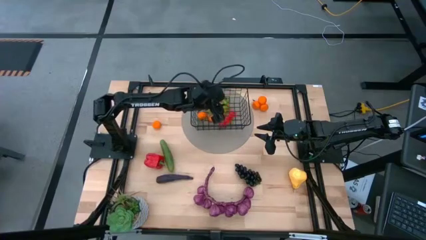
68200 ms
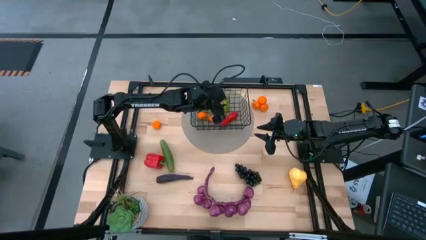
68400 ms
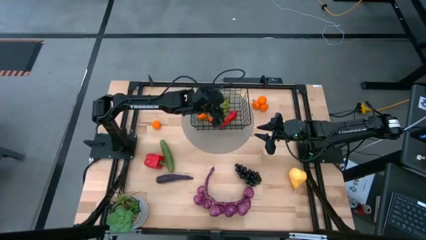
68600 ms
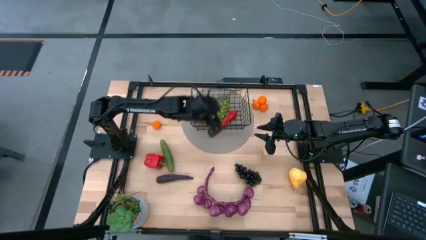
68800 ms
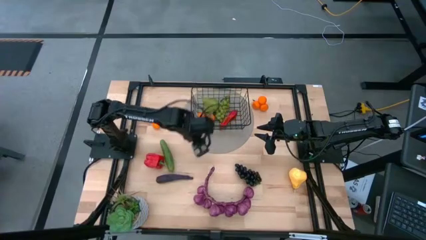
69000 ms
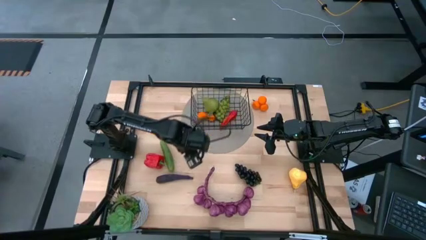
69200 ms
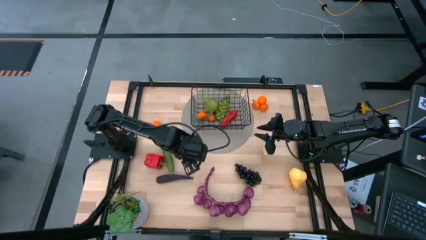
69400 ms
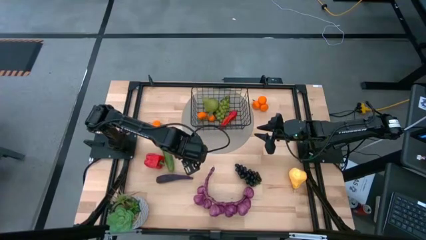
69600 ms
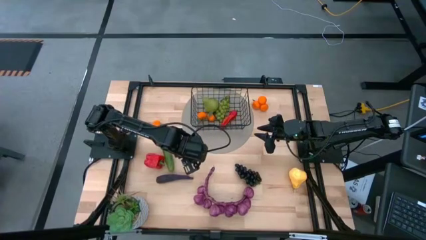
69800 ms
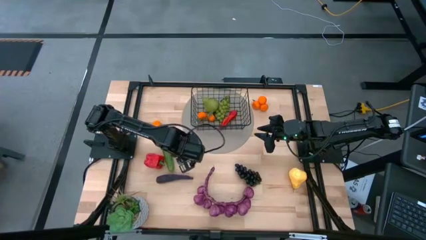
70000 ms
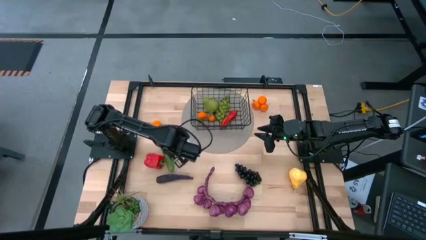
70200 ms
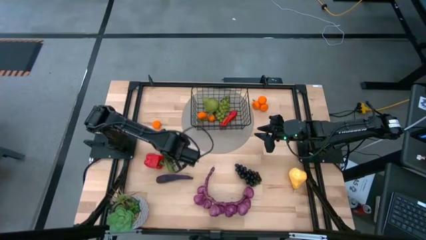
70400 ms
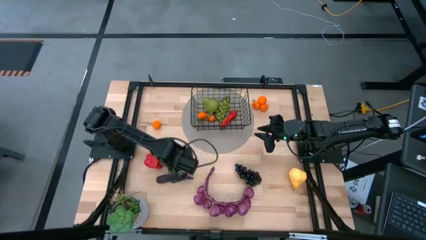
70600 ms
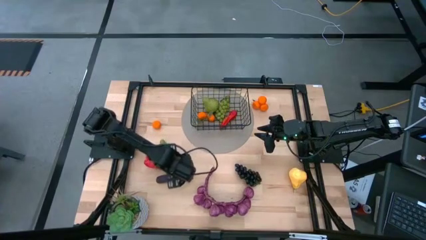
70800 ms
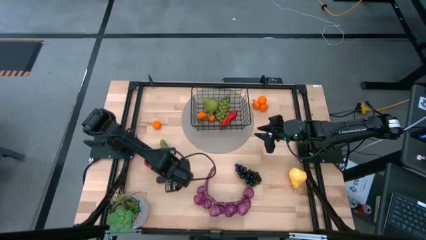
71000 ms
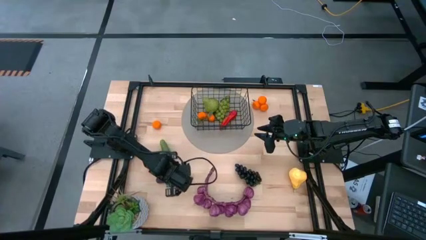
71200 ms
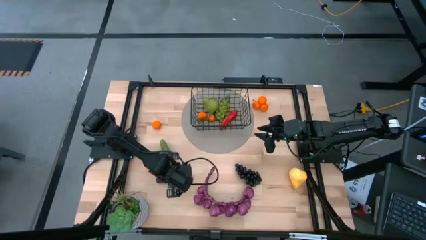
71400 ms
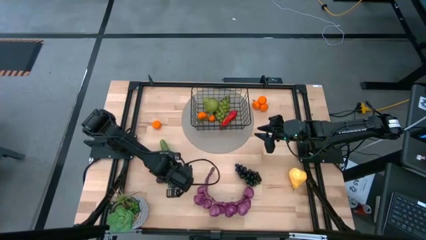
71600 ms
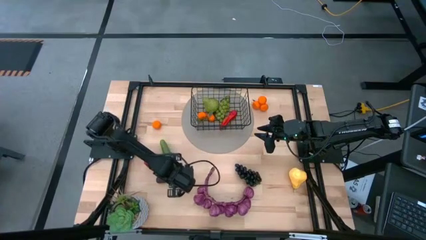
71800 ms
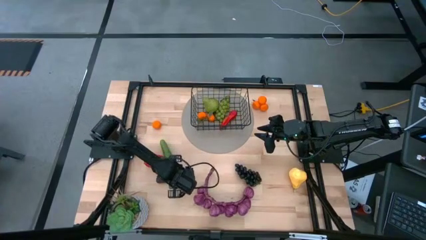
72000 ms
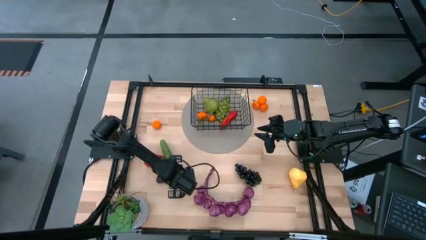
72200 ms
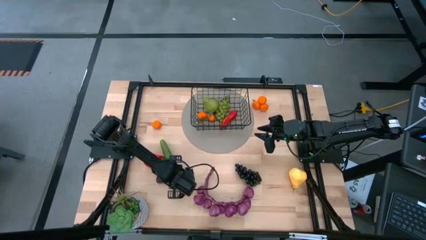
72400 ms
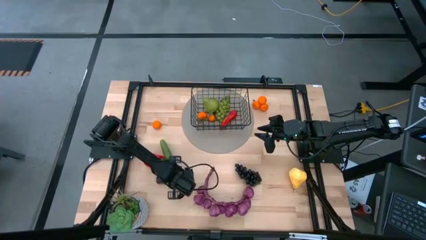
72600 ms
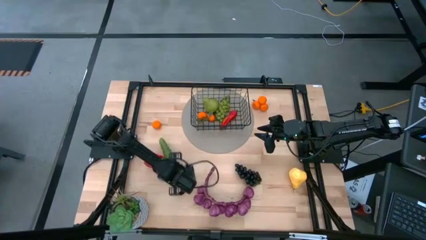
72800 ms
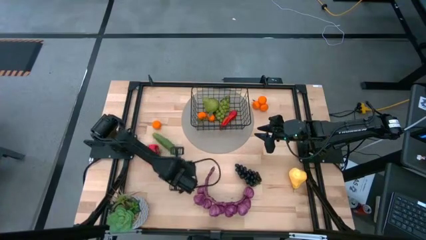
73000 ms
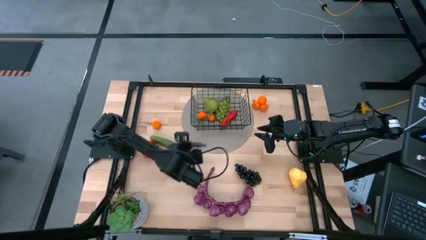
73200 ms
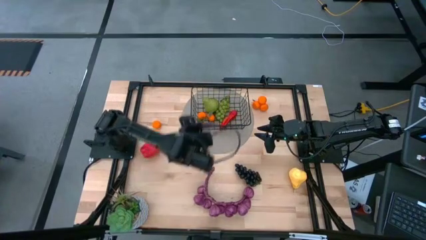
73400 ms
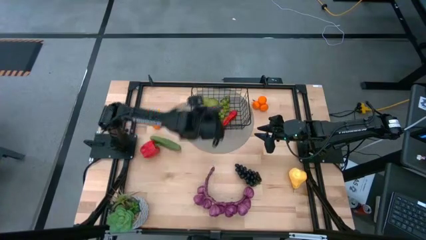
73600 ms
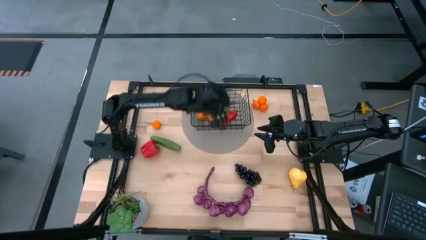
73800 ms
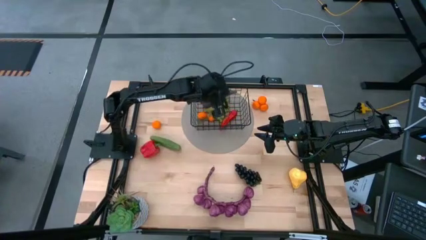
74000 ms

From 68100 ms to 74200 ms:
Task: Build produce basket
Put the violet eggplant into the black wire basket

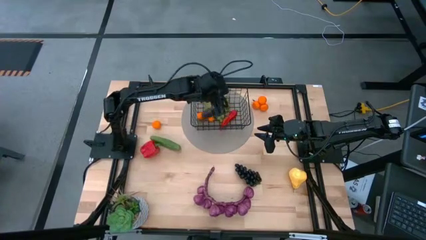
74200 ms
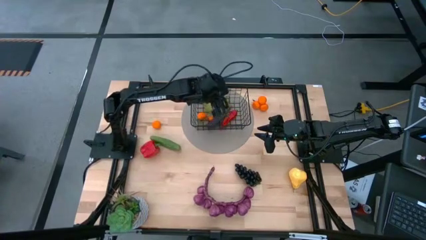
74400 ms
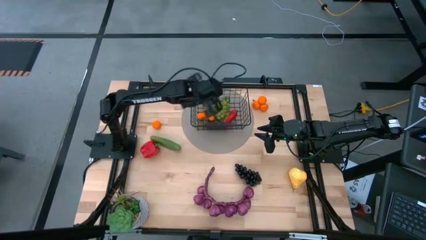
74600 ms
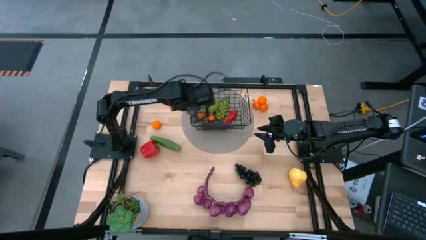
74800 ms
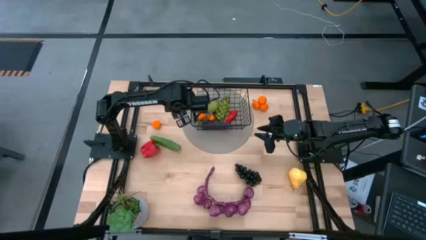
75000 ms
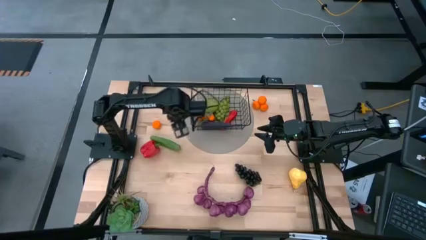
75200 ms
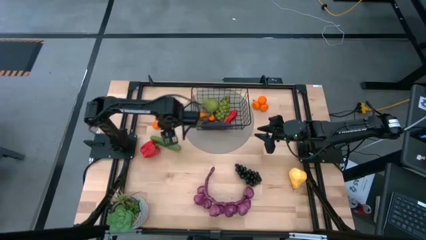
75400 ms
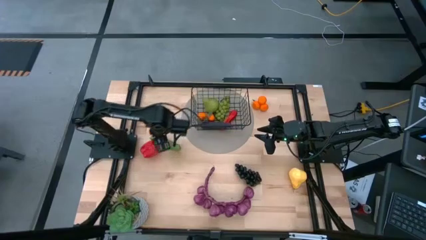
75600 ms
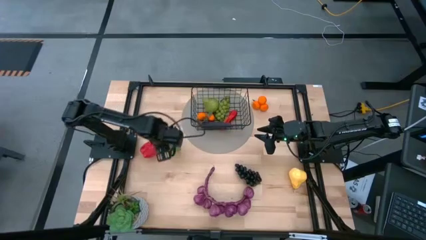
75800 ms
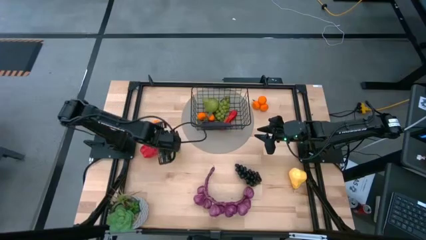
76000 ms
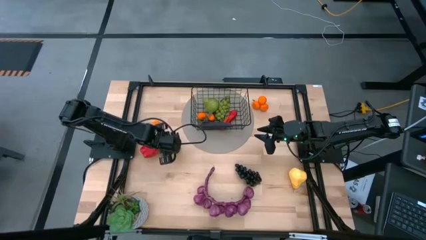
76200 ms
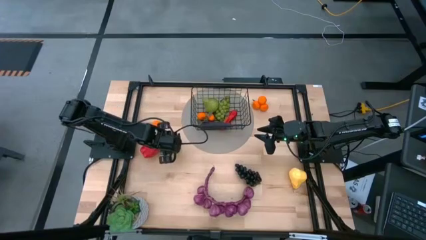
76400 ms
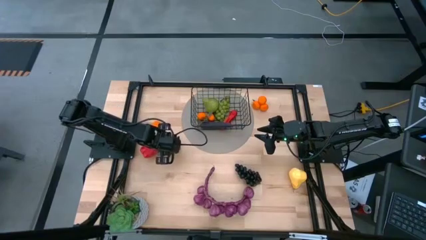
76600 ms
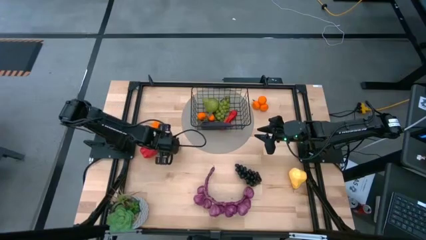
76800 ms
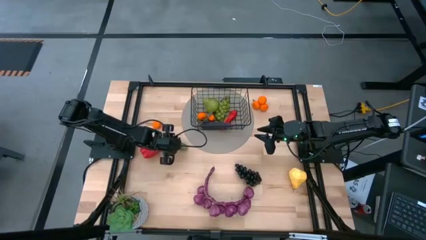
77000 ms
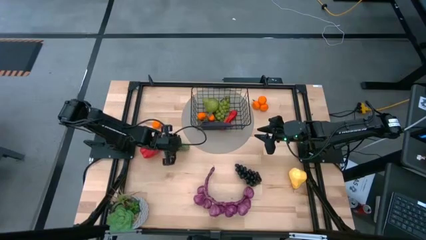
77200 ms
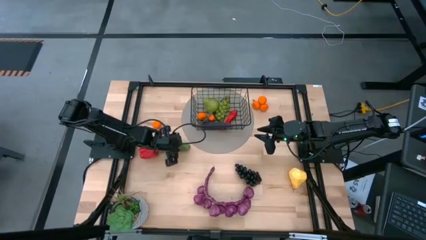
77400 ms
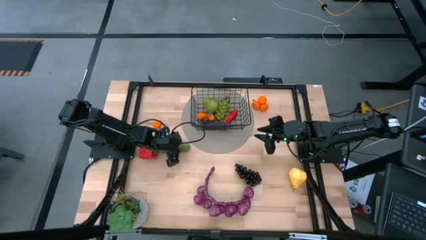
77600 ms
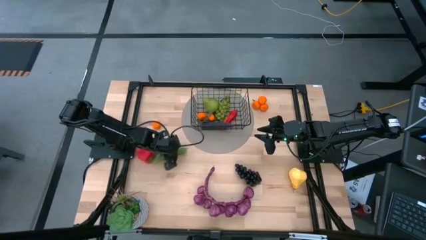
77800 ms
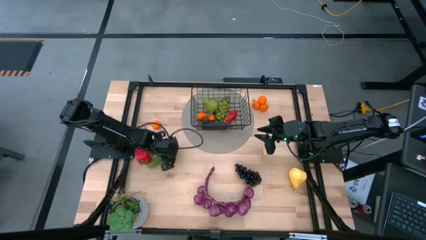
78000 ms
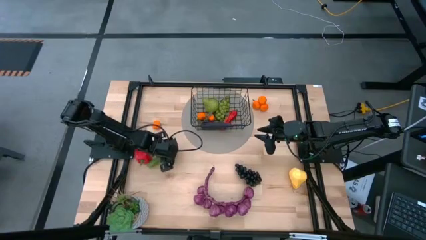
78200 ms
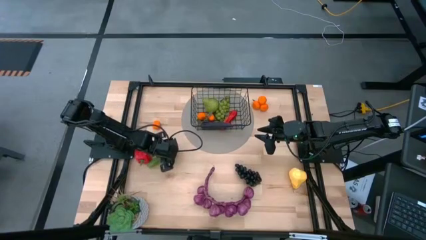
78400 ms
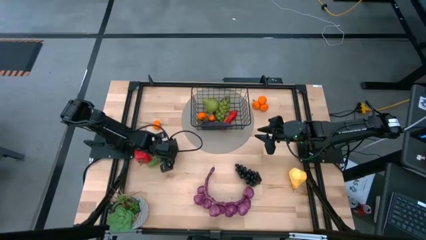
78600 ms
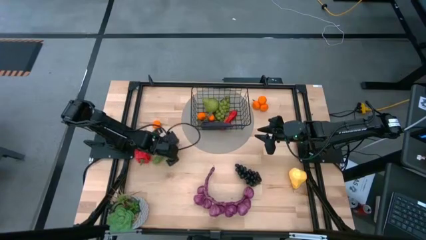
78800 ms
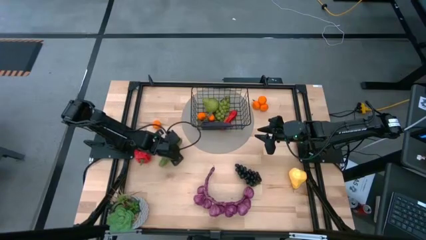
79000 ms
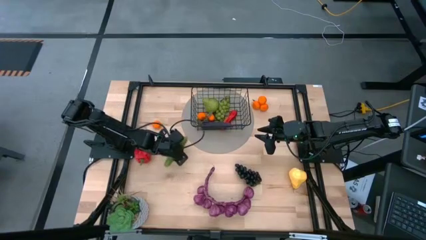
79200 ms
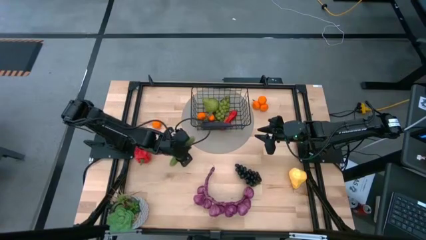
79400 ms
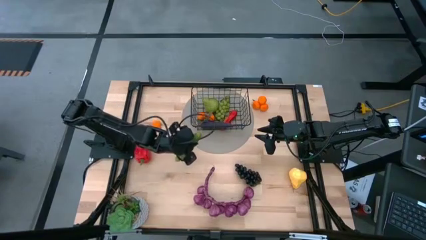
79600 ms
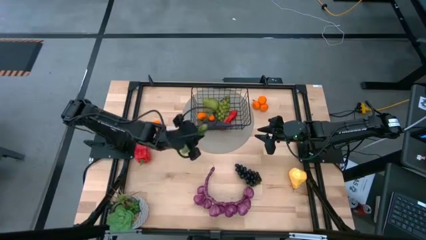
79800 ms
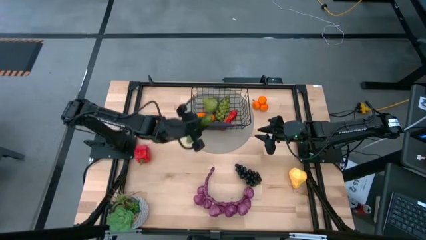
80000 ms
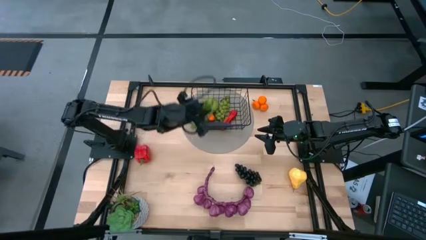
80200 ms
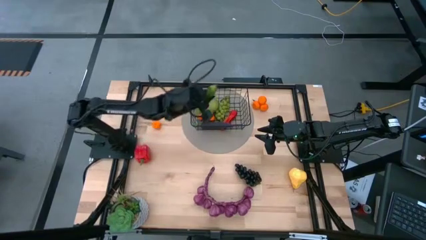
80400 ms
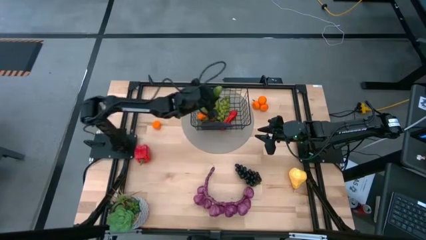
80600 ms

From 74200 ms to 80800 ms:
Put the green cucumber into the black wire basket

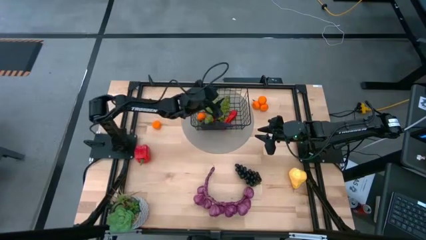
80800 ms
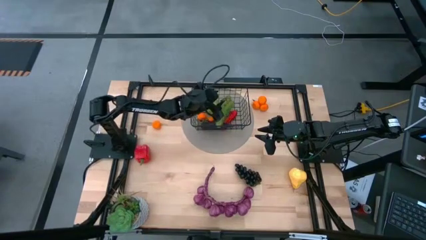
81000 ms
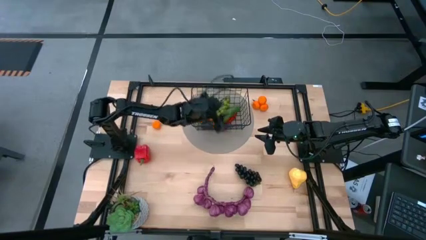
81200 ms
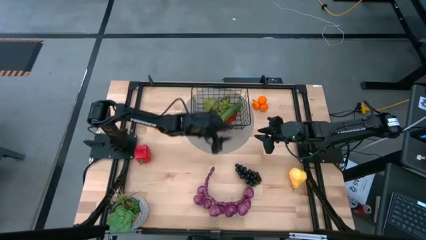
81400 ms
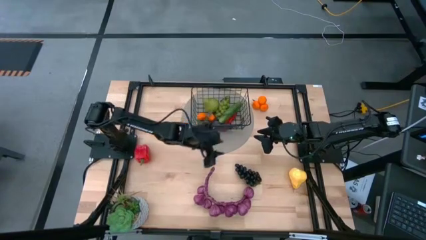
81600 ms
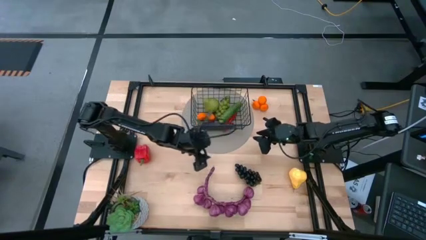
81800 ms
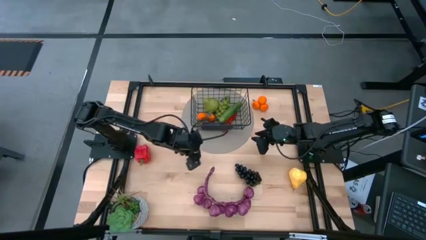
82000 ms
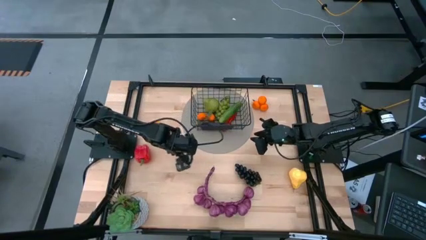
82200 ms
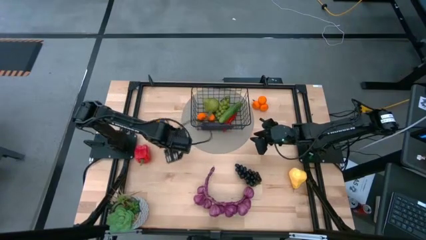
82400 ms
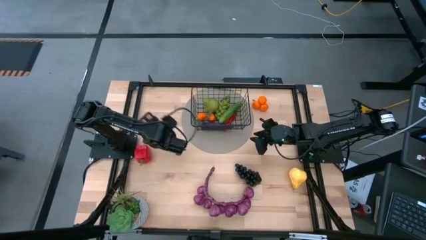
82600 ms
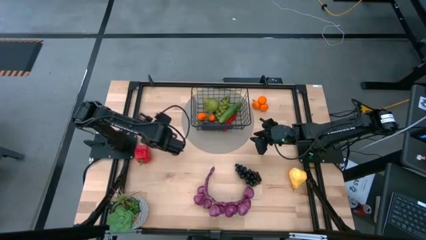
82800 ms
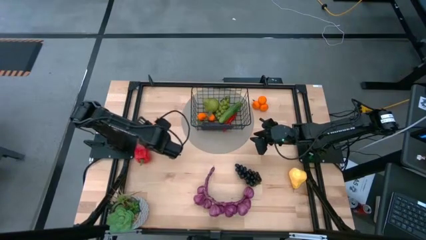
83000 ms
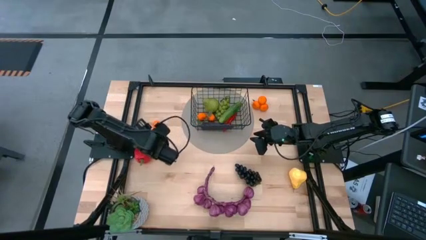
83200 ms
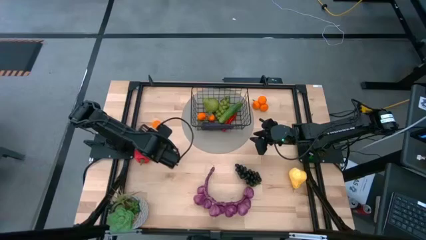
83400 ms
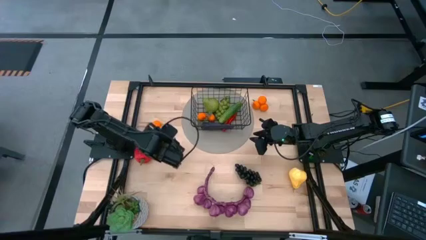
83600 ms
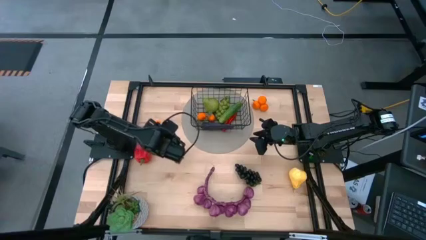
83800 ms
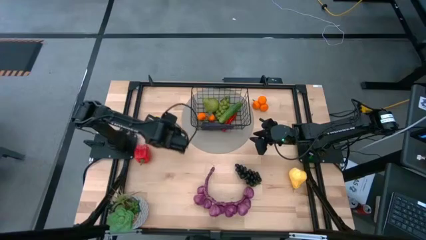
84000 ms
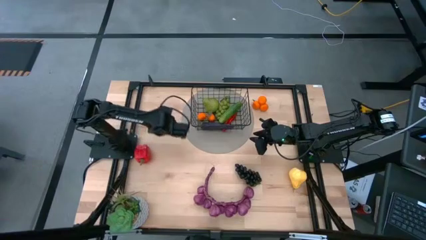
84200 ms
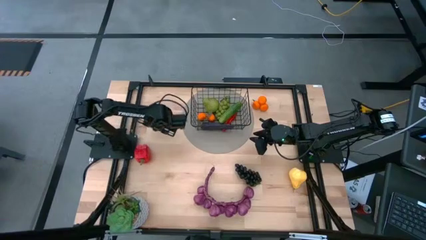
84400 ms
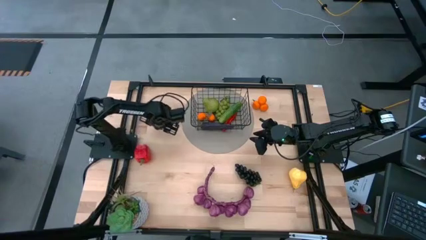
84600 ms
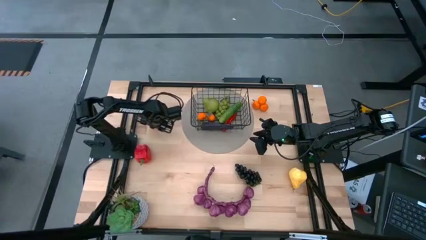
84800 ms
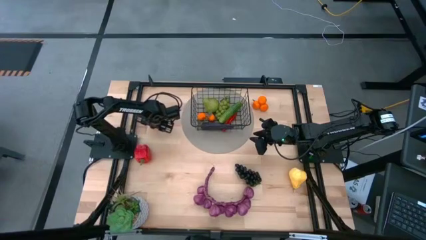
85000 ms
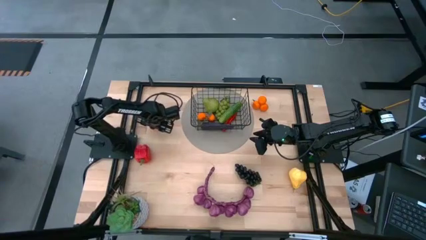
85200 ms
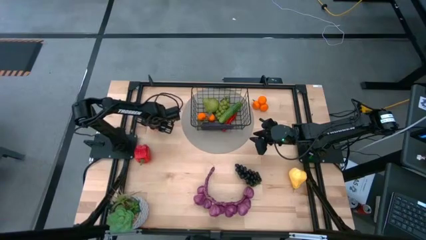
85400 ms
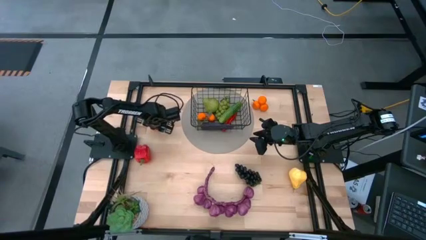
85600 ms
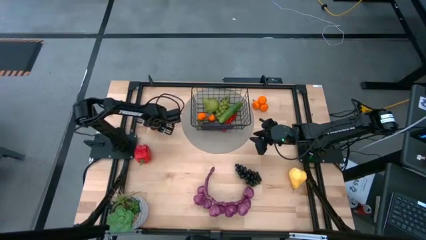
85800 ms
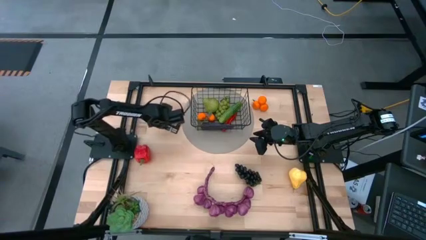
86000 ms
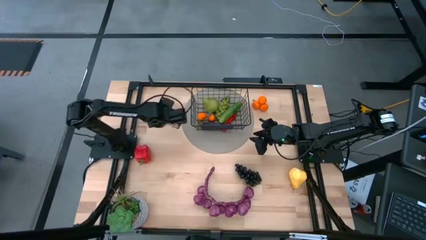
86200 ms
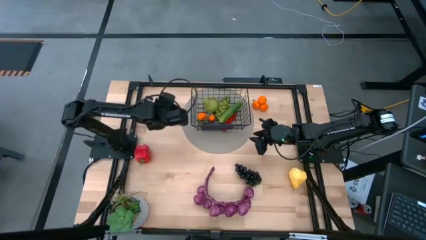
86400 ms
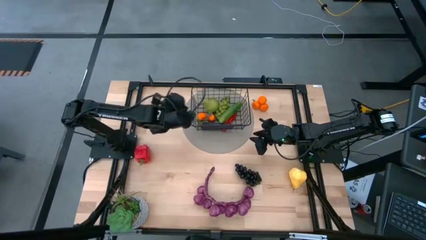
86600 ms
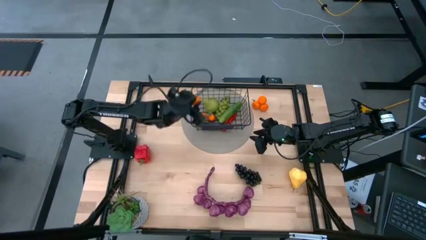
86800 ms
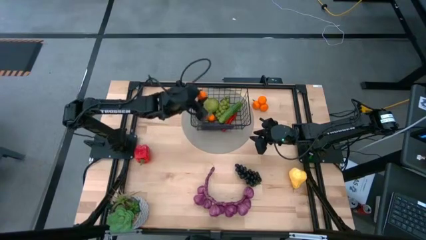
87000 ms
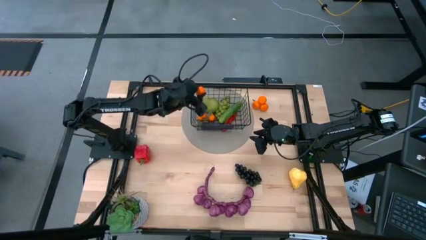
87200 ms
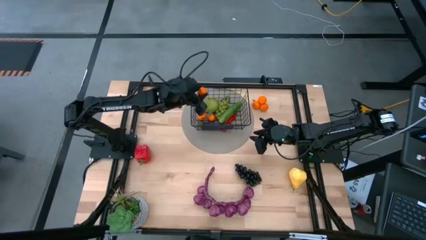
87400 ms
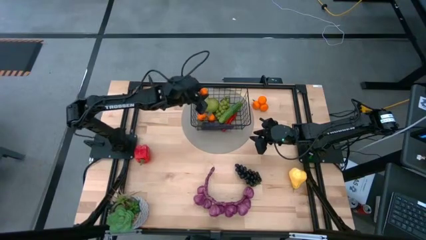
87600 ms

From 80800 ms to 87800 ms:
Put the left tangerine into the black wire basket
